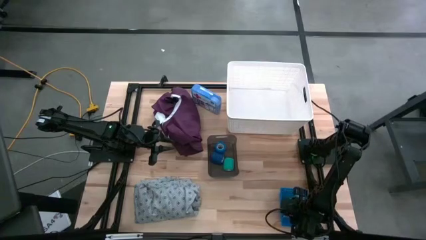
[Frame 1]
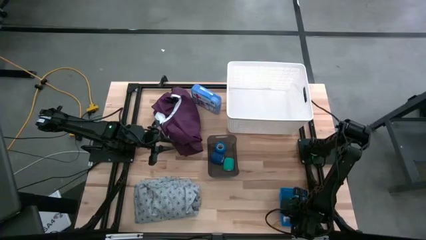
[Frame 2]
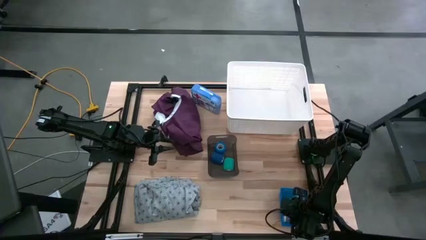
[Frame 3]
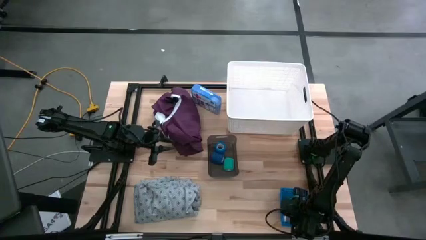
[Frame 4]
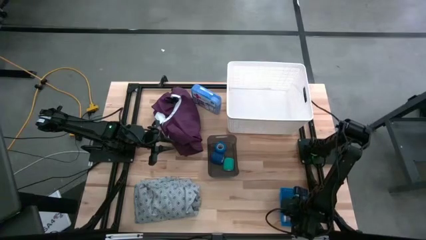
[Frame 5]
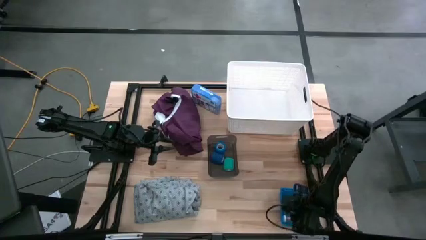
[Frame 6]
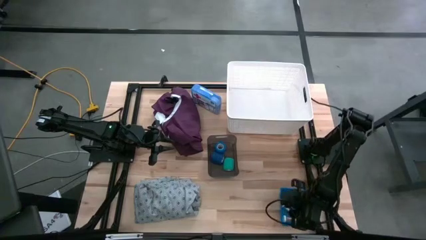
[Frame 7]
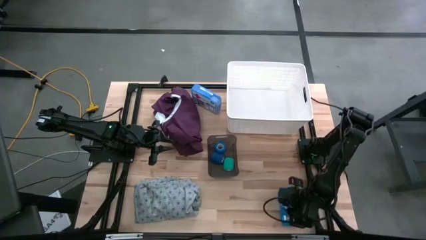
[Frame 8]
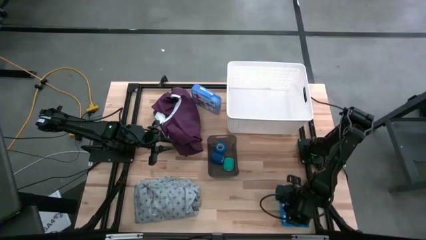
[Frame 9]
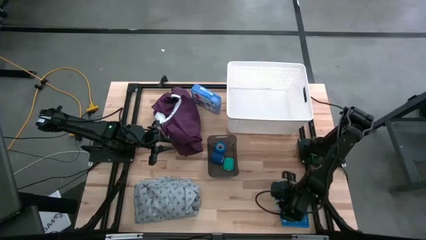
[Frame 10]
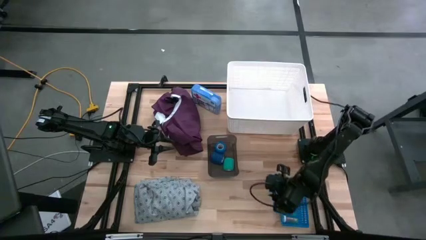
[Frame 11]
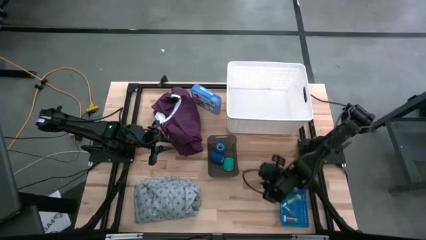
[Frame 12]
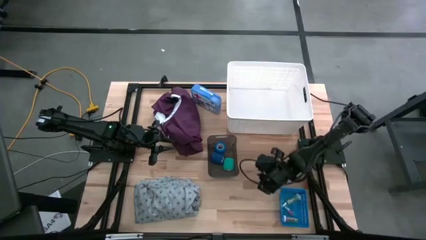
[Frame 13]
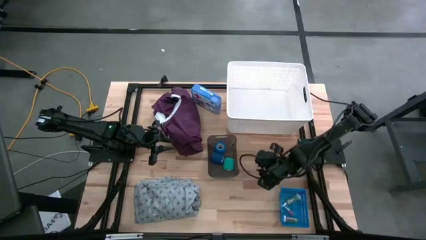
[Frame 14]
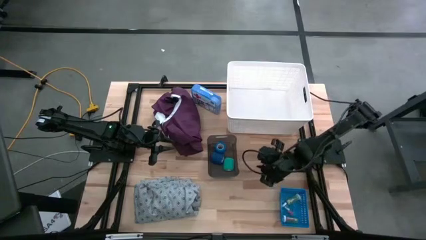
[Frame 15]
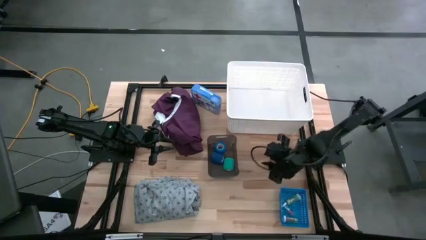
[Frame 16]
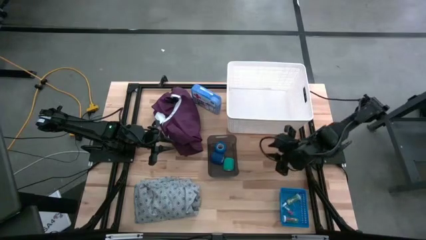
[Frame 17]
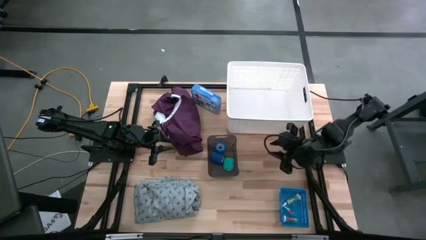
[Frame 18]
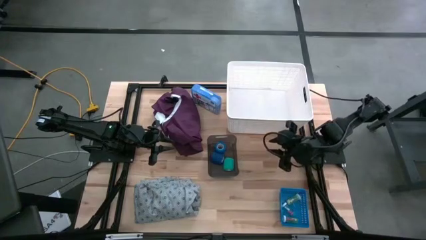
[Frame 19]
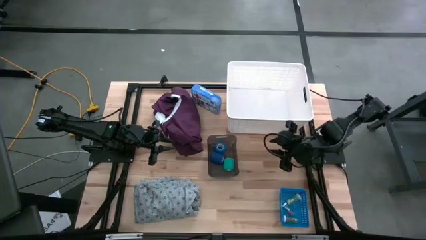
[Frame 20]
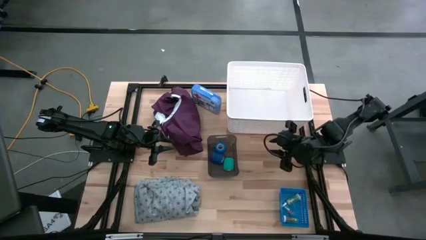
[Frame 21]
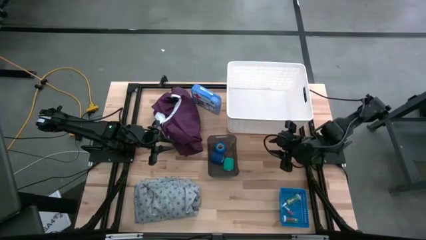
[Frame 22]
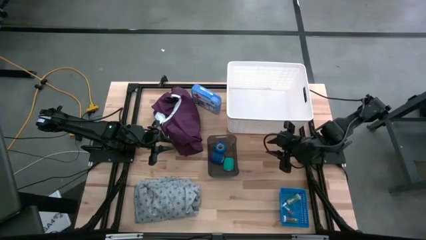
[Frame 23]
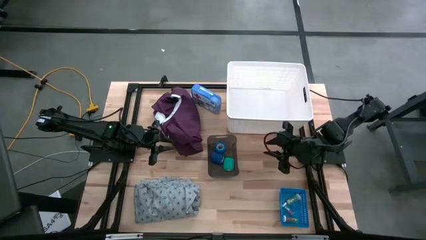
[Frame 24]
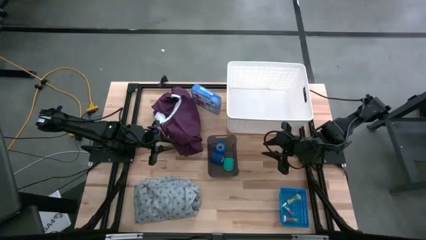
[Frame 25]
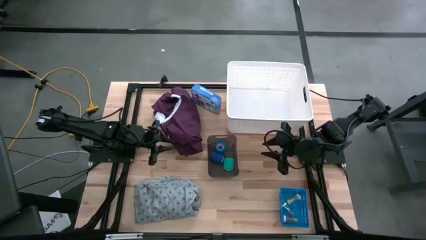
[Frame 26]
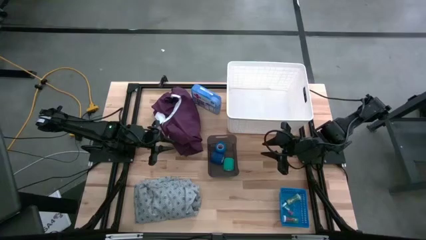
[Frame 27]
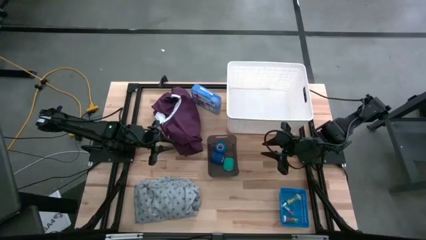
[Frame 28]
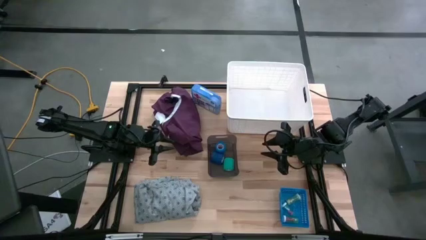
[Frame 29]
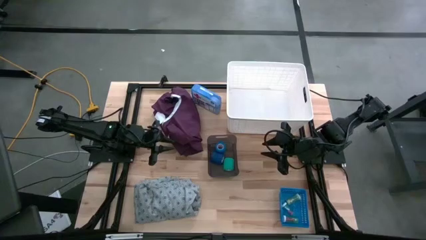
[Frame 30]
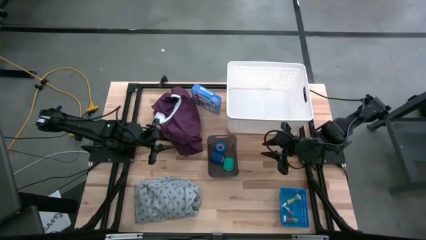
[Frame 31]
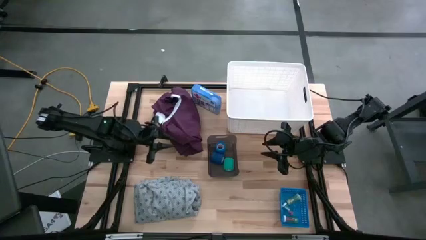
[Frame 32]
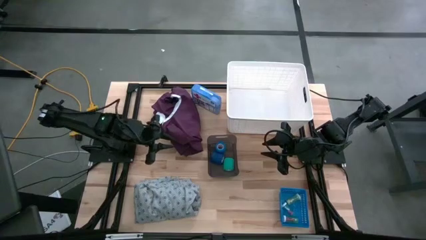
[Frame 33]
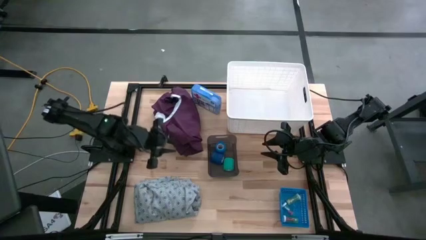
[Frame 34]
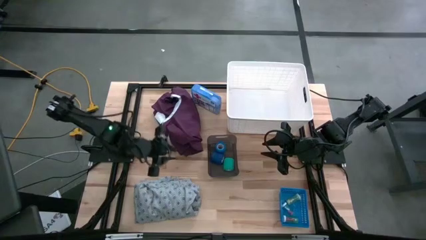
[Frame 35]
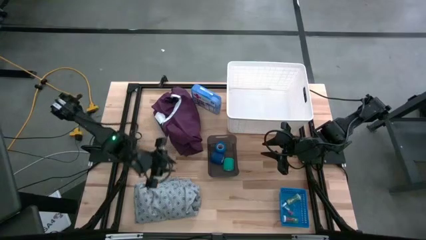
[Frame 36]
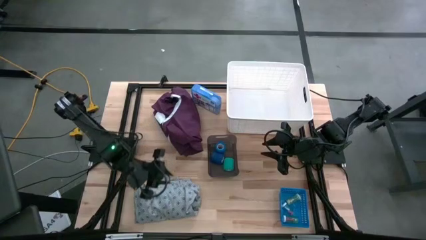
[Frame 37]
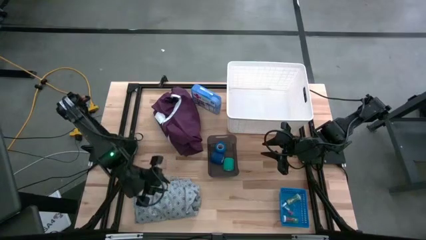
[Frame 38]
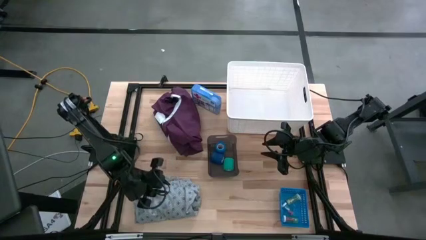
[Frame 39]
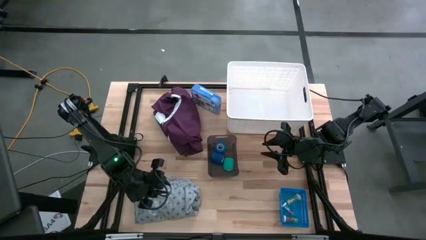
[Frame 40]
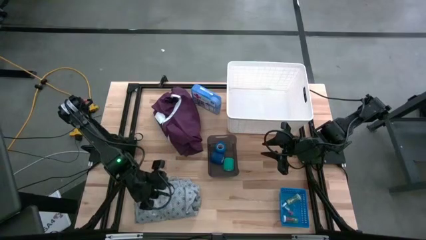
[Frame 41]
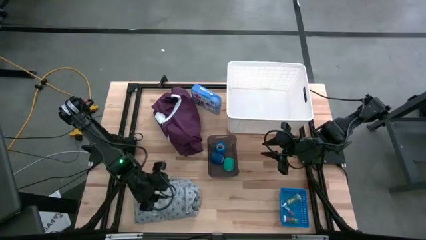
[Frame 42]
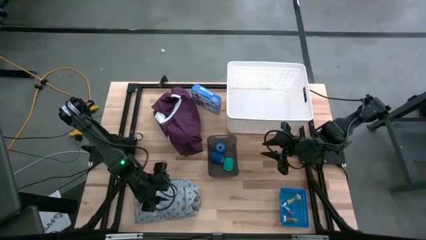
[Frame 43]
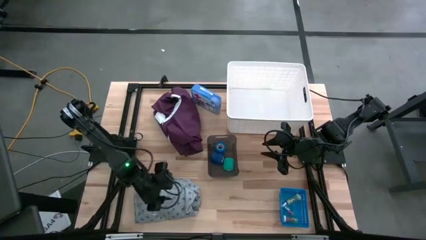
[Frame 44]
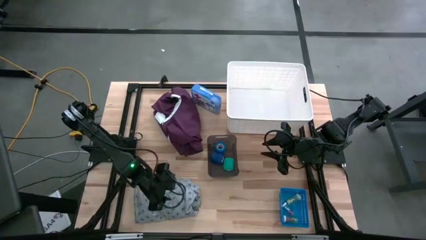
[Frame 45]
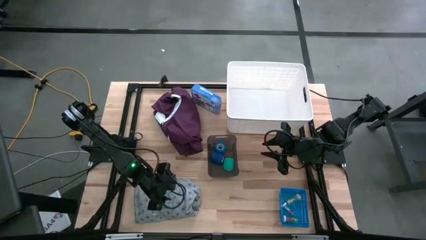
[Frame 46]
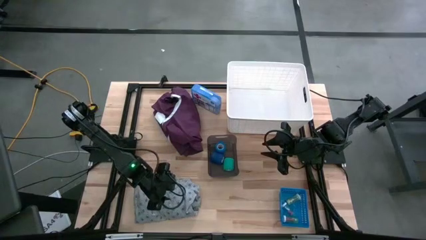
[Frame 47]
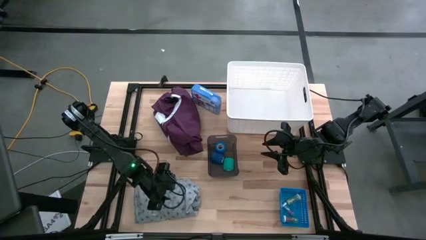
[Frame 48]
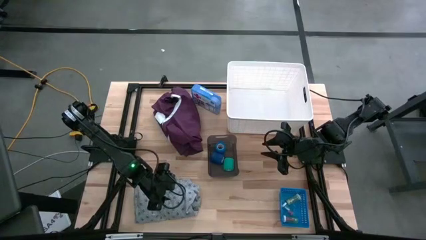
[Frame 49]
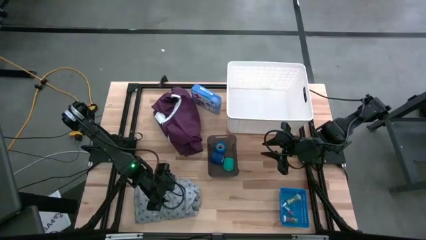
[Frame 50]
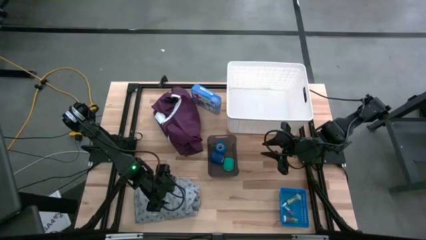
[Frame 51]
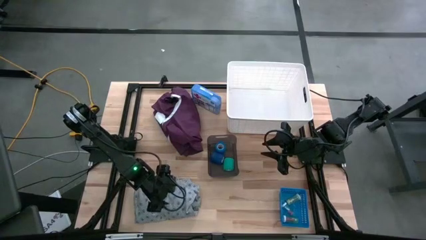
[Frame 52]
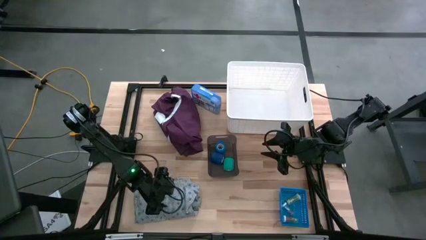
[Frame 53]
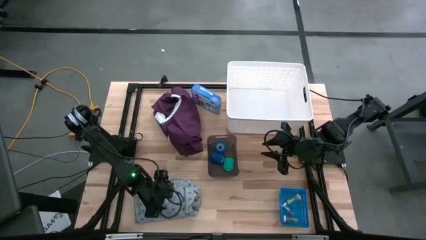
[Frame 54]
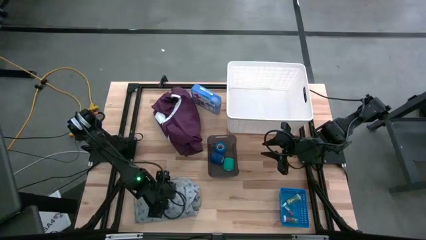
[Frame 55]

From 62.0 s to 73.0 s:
Task: Pick & Place Medicine items
Put the blue patient gown into the white laundry bin
